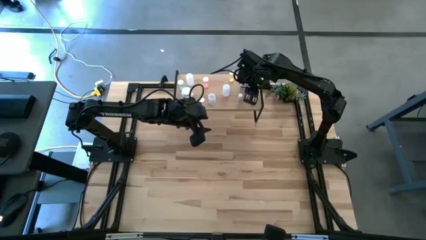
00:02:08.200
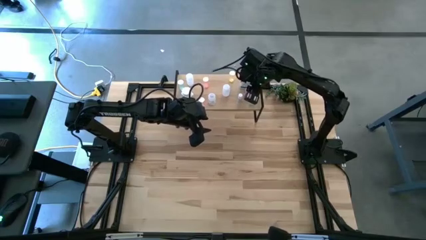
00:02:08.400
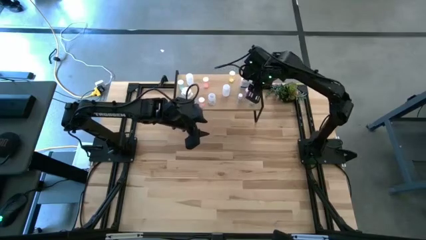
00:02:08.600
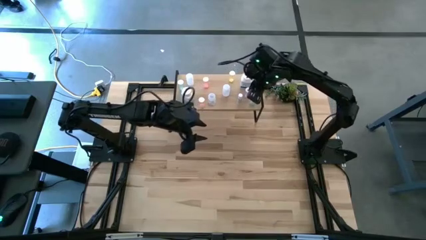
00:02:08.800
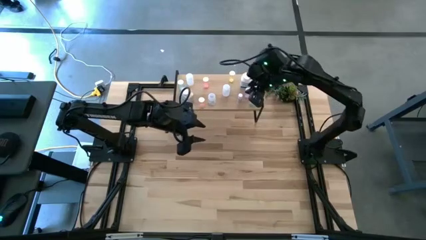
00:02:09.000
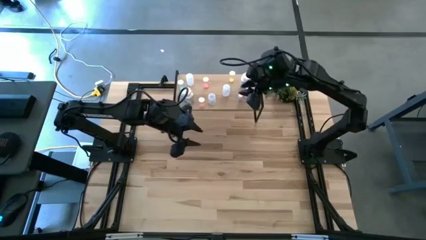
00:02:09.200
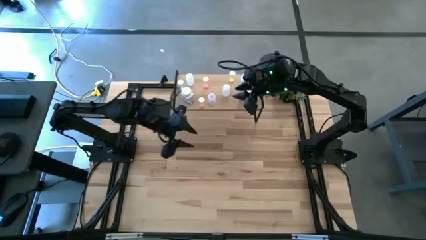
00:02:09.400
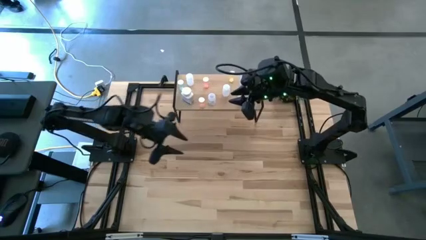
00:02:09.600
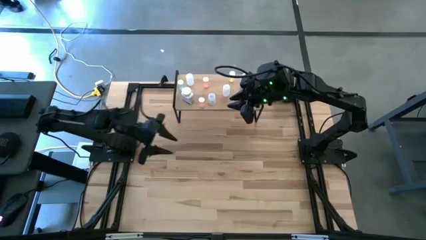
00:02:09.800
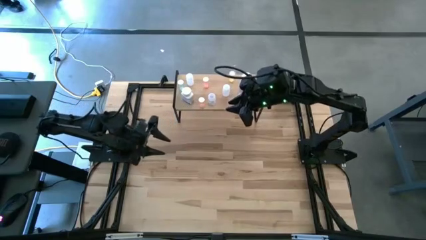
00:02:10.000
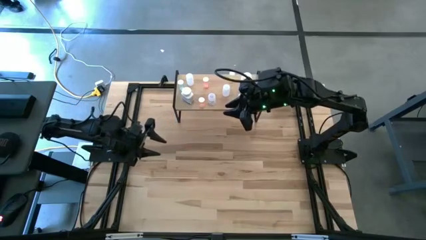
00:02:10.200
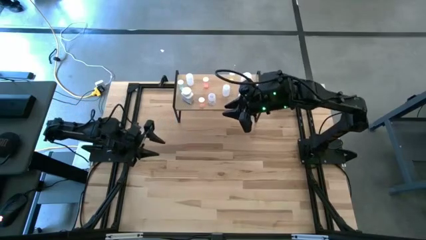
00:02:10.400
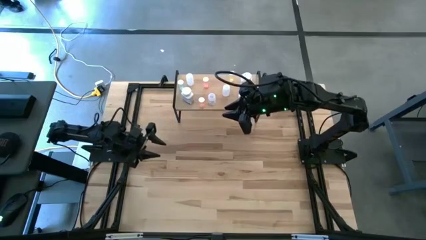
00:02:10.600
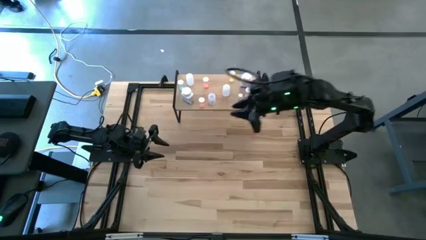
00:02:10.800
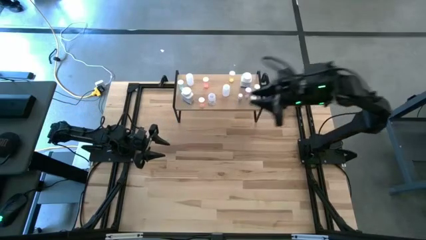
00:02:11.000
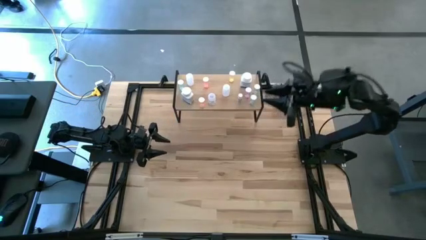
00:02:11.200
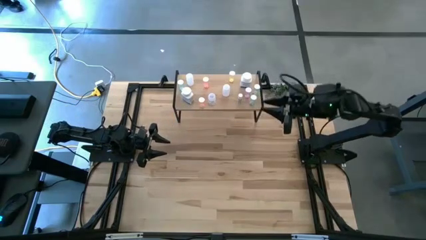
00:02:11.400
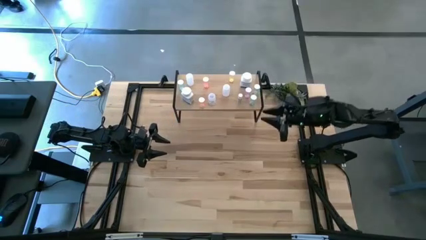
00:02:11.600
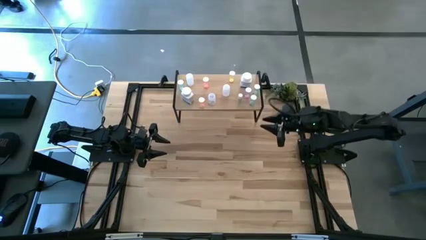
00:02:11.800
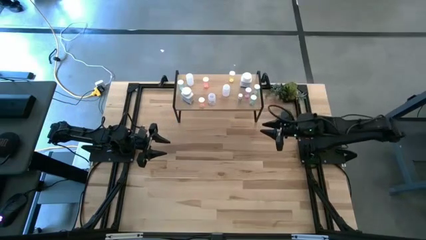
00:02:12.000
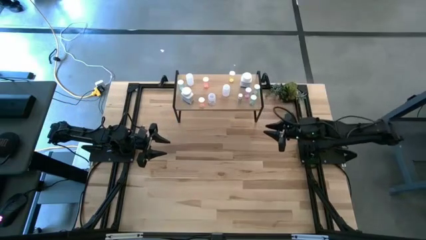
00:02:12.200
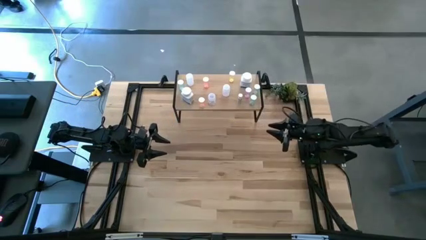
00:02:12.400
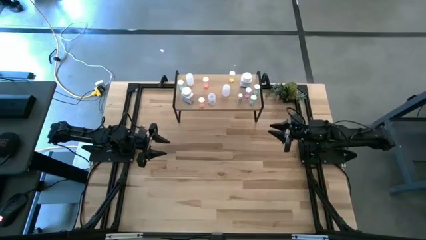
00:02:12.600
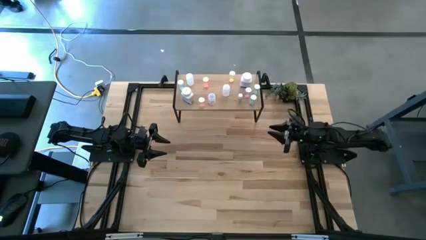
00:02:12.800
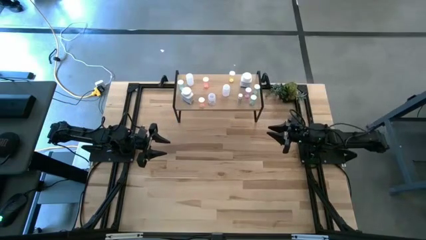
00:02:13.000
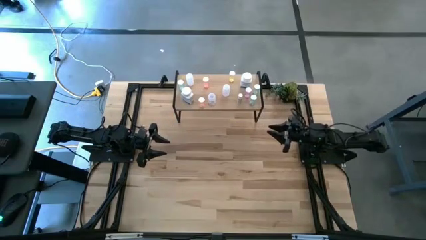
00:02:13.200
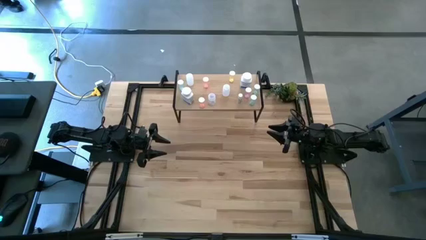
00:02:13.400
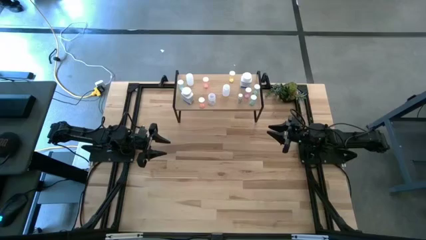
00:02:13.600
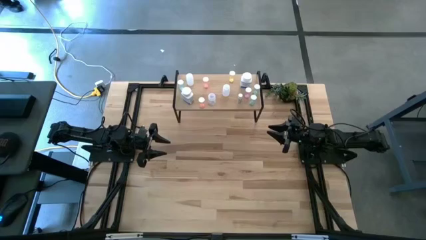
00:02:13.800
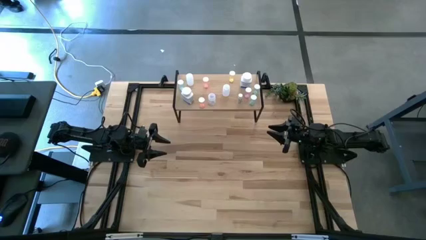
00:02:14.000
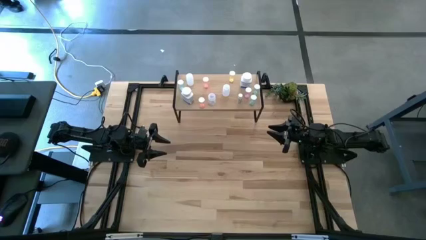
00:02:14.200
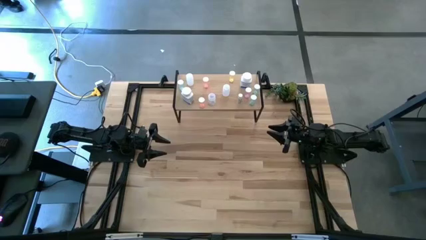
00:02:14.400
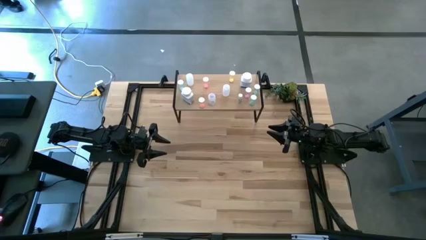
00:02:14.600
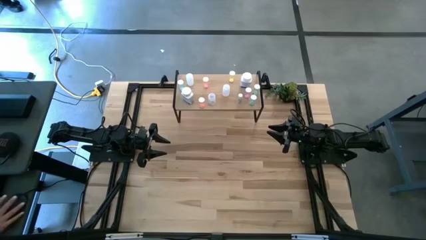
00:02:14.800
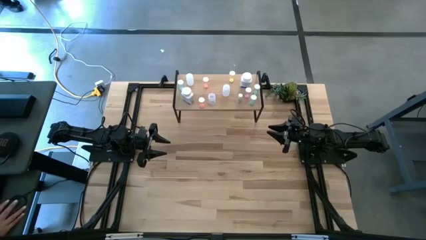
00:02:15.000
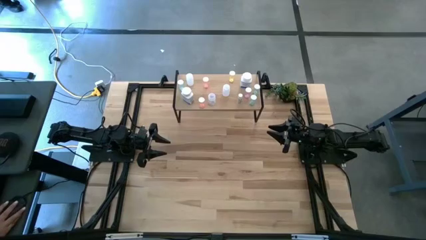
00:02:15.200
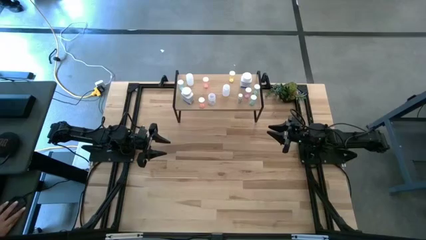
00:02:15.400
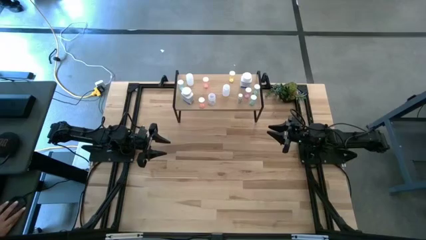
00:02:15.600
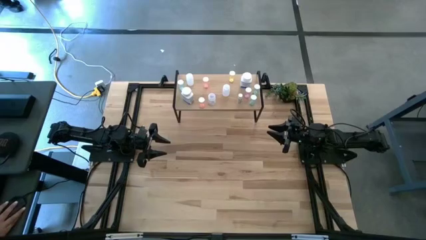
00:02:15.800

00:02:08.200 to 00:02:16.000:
Task: Pick and place medicine bottles onto shelf by color
Return to Home Position

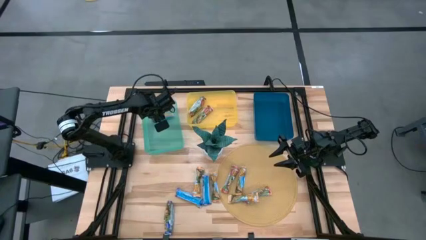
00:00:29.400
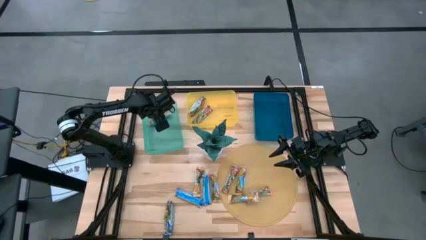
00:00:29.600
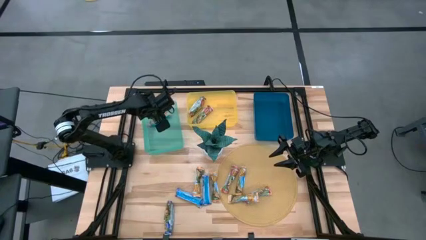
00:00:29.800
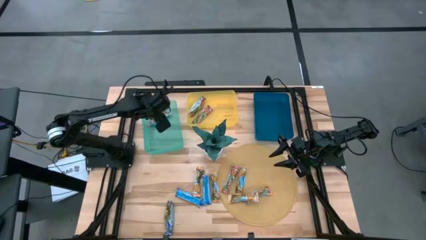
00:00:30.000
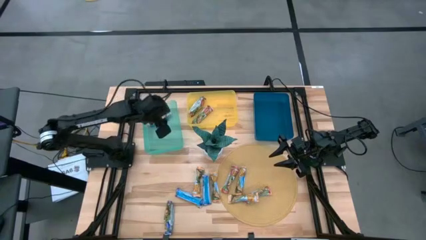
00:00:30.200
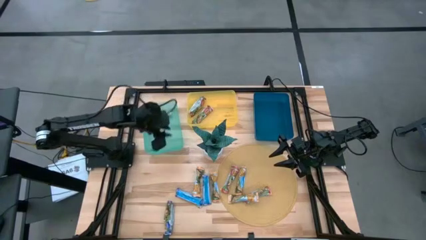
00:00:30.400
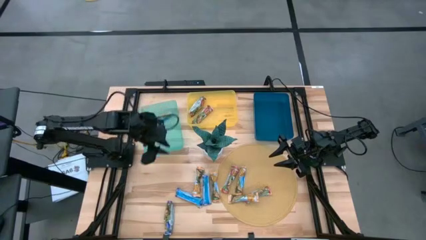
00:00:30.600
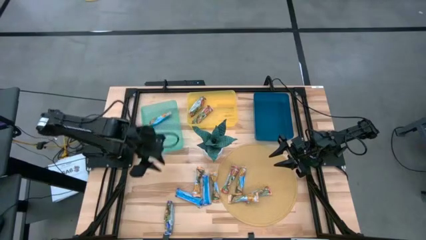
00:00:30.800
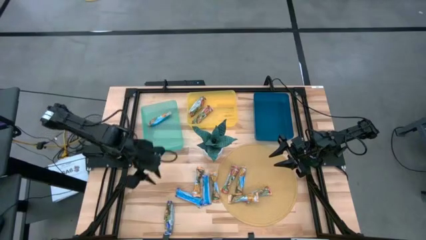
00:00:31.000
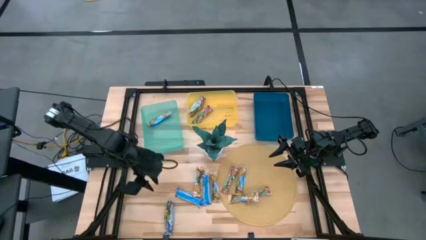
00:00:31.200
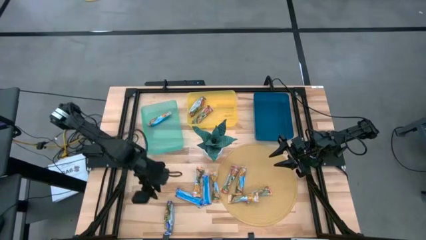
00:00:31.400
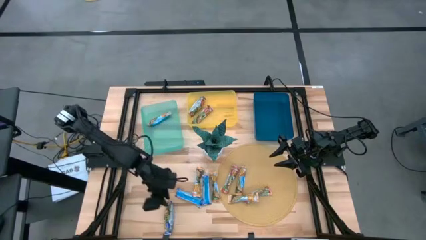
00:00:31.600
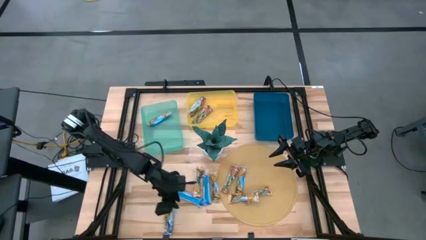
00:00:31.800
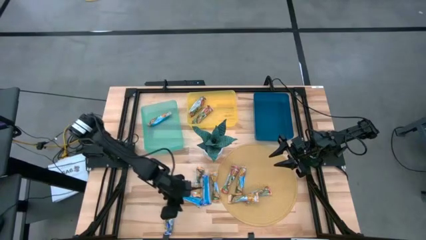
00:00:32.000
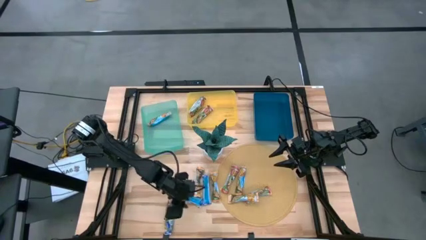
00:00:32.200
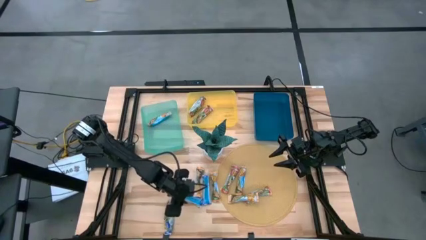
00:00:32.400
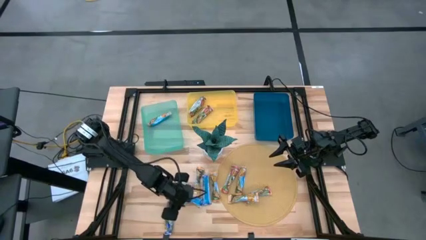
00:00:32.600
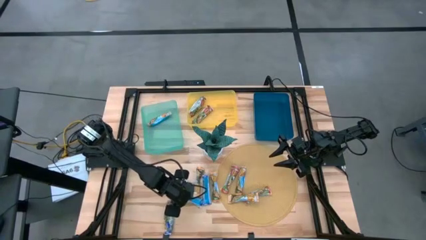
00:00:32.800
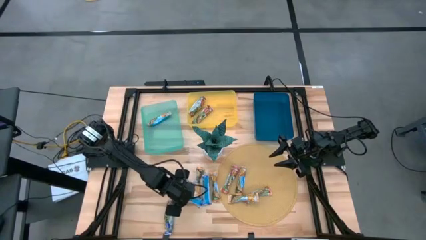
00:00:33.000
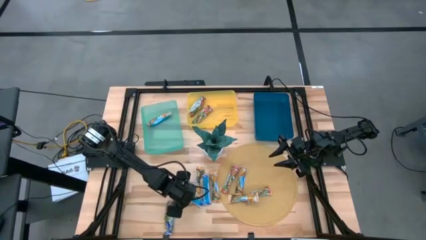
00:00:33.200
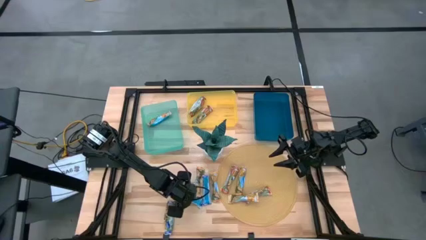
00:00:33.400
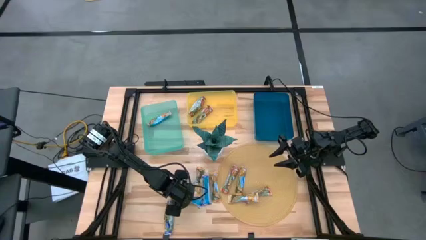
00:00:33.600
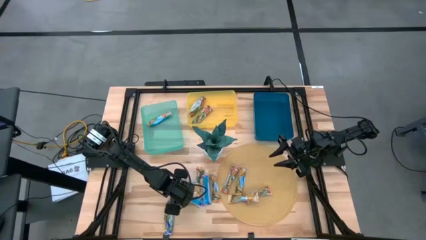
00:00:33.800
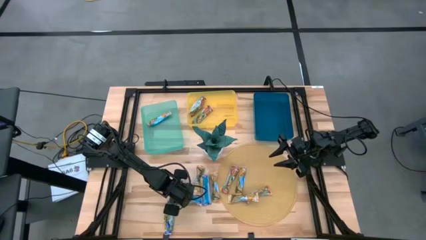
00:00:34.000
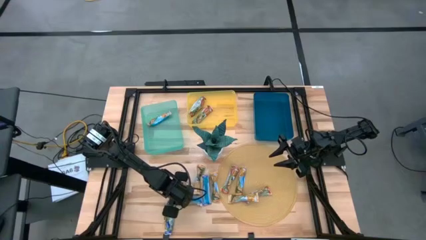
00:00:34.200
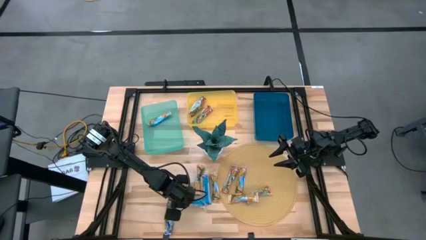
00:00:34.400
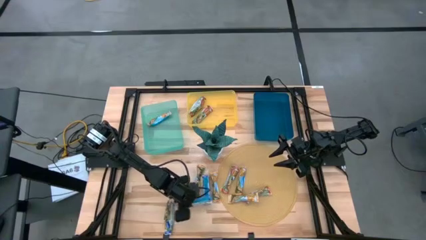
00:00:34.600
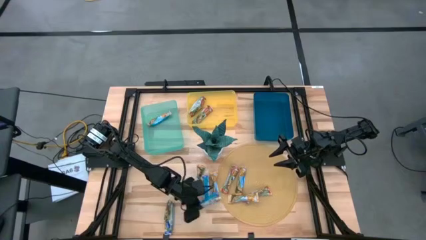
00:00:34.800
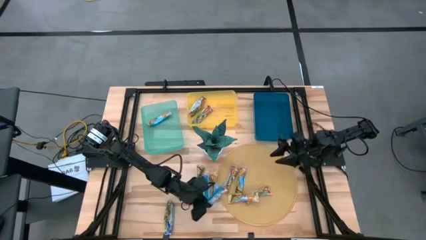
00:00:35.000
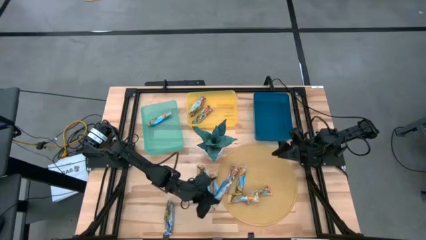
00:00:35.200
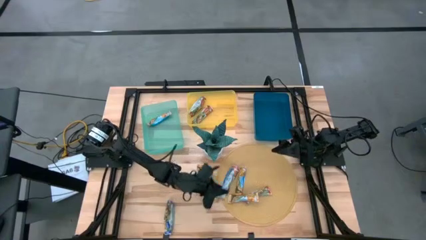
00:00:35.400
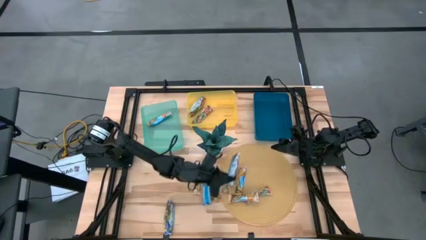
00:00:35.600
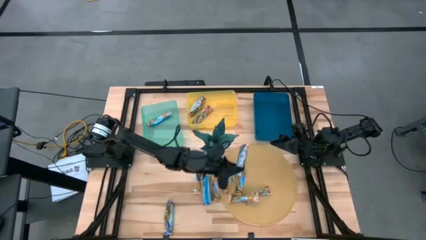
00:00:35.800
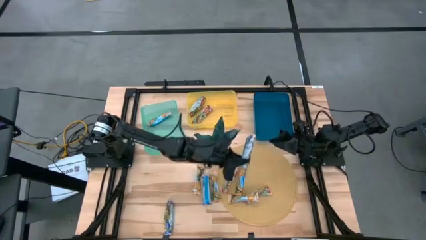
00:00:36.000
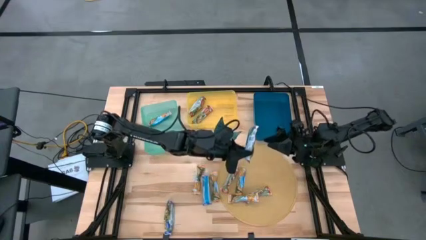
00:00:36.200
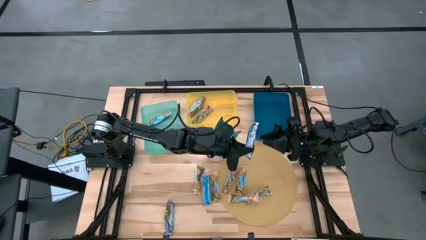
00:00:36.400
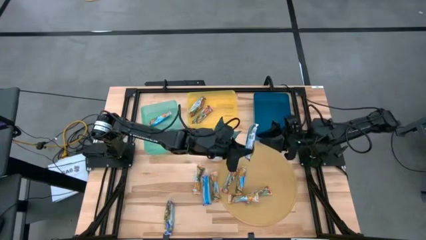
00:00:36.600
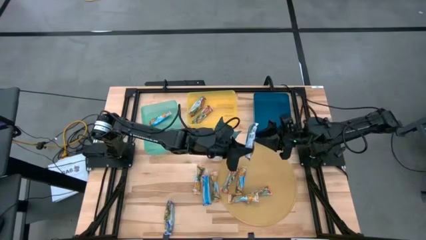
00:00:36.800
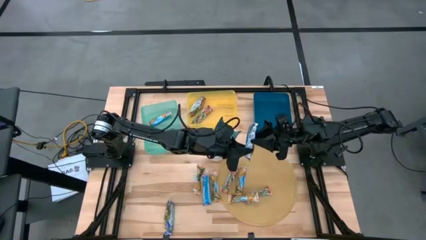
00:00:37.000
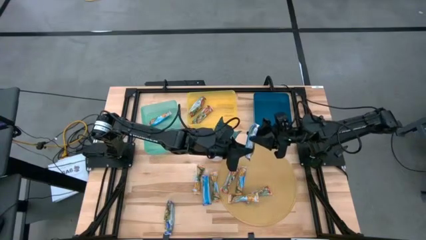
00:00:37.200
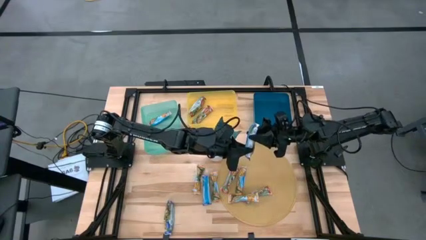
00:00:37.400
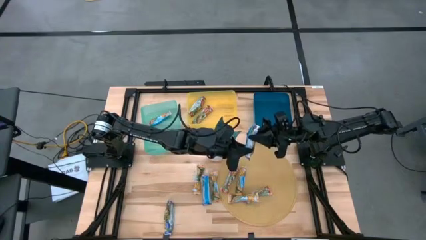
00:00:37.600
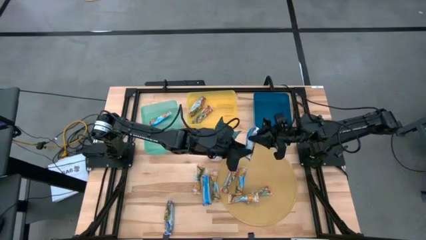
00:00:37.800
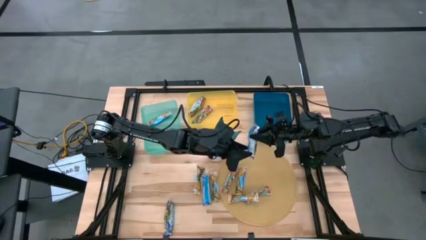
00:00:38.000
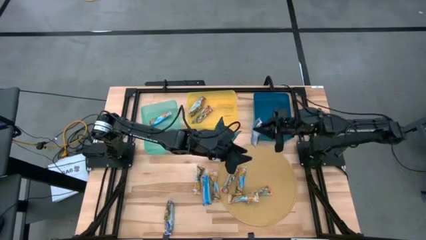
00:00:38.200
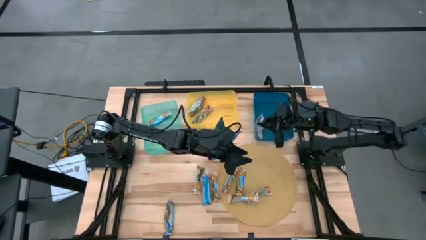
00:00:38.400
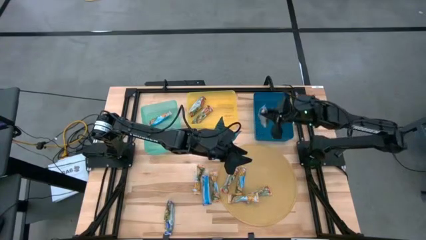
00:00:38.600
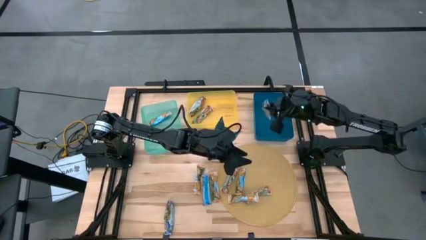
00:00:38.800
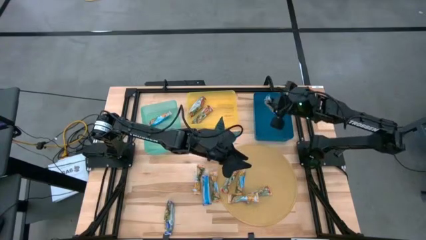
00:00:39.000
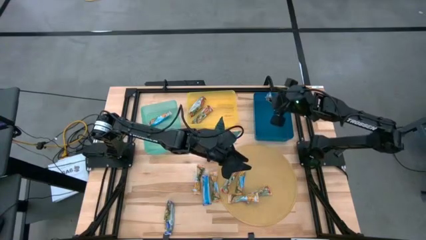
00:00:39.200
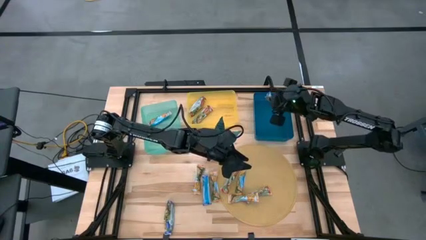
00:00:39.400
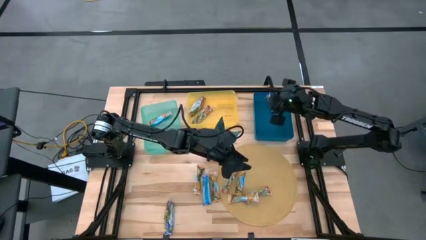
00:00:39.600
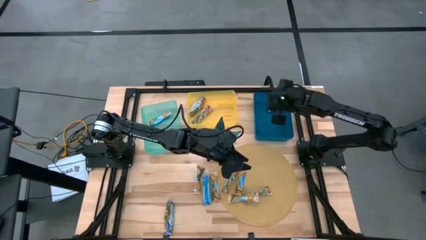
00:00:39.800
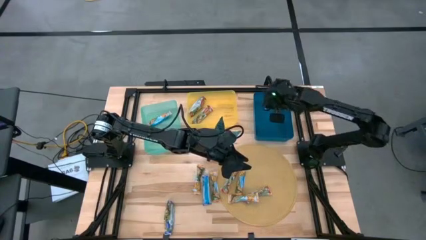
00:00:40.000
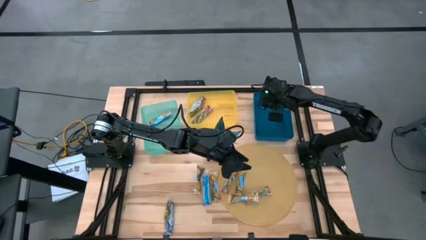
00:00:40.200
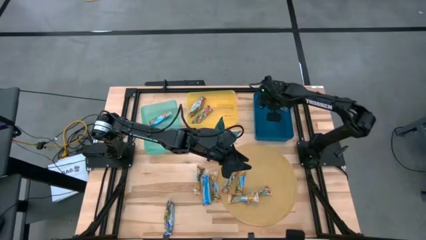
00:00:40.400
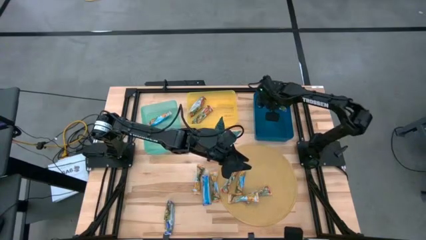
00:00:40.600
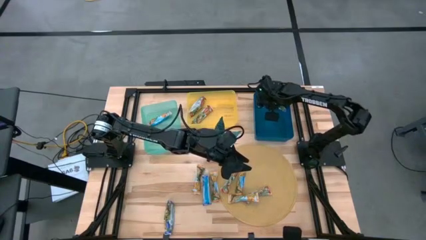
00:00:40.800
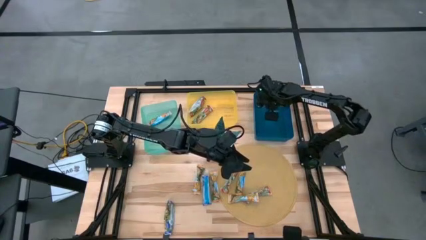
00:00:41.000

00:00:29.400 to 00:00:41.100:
Task: Pick and place Granola Bars by type
Put the purple granola bar into the blue bin
